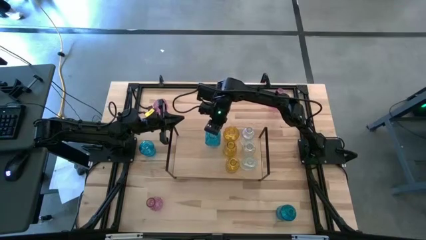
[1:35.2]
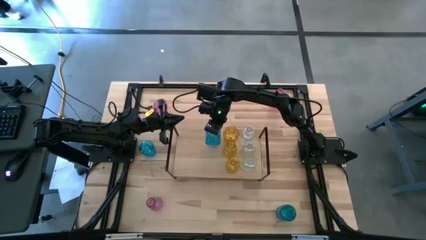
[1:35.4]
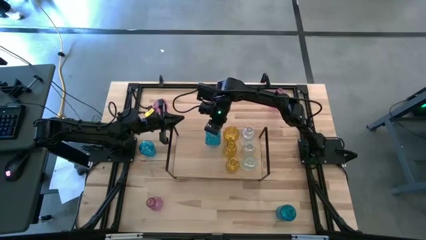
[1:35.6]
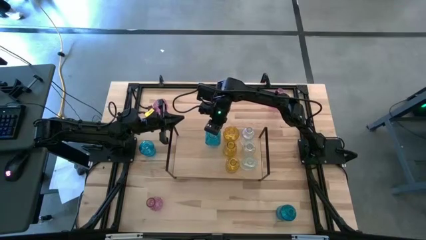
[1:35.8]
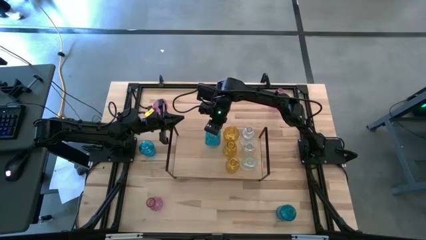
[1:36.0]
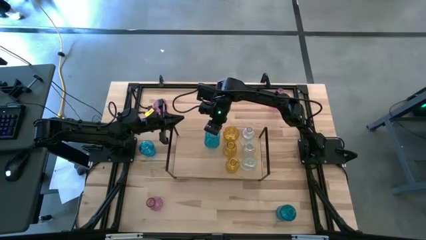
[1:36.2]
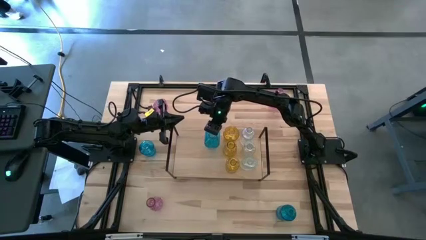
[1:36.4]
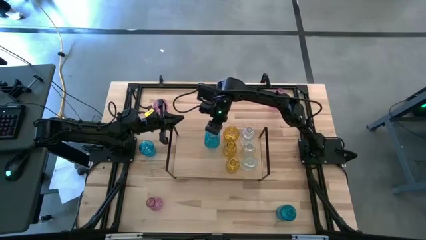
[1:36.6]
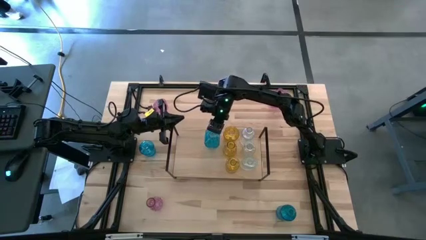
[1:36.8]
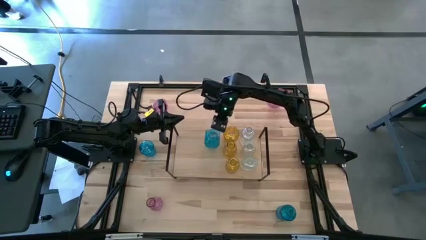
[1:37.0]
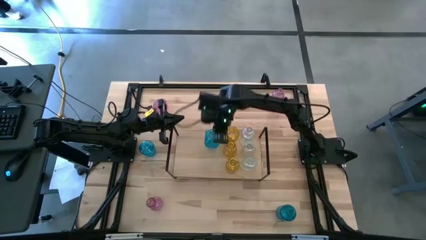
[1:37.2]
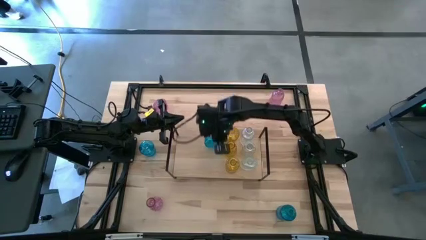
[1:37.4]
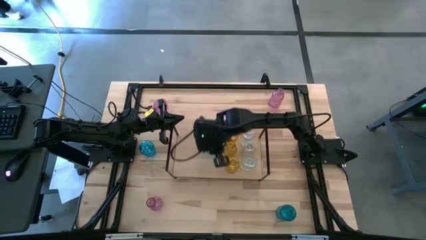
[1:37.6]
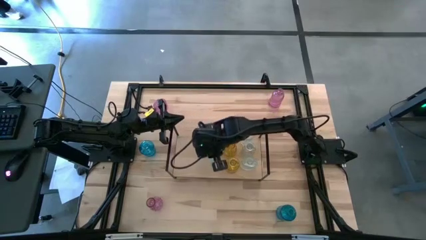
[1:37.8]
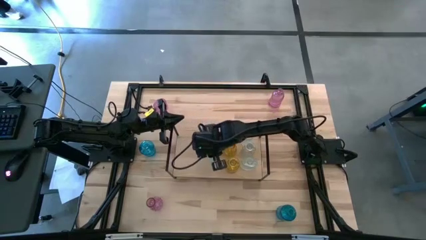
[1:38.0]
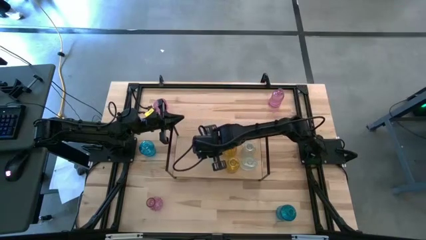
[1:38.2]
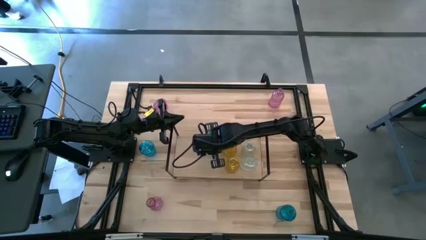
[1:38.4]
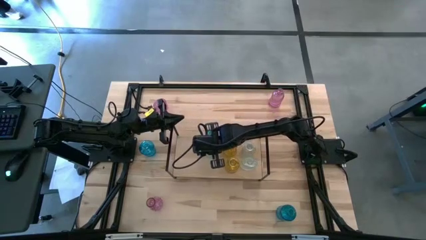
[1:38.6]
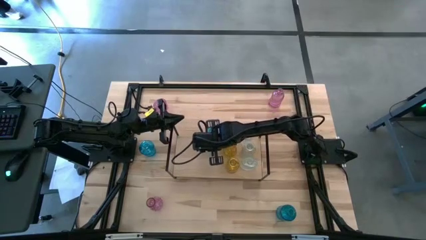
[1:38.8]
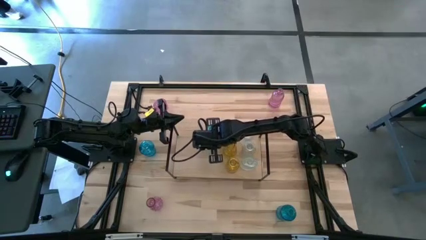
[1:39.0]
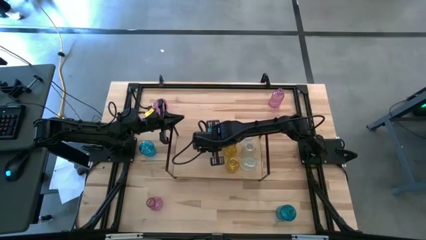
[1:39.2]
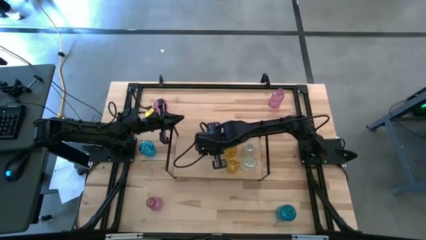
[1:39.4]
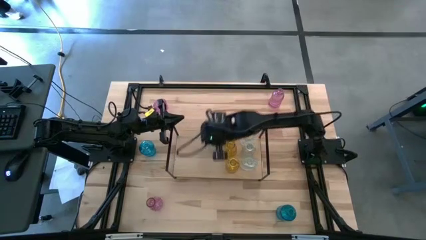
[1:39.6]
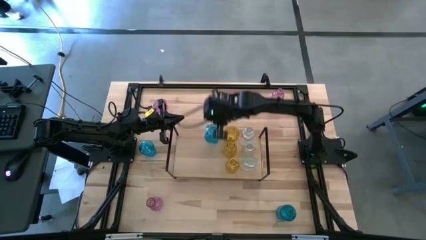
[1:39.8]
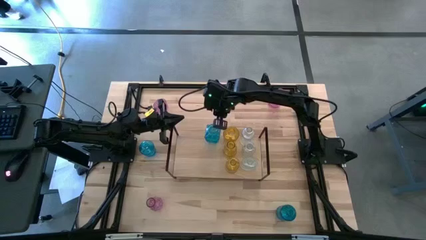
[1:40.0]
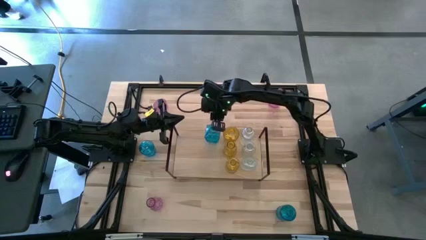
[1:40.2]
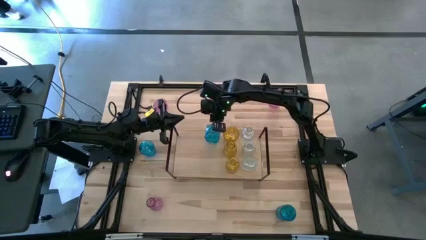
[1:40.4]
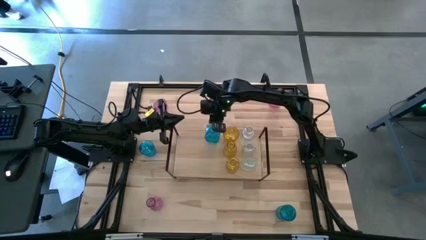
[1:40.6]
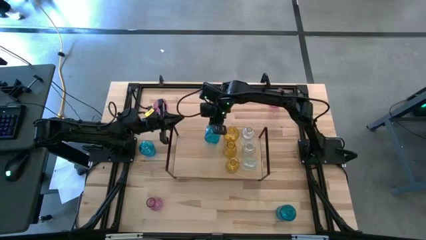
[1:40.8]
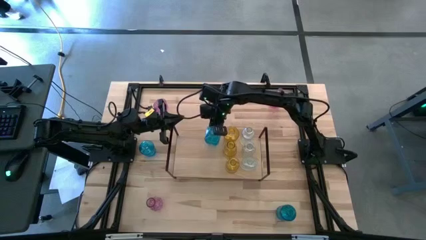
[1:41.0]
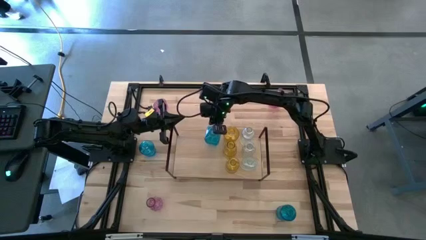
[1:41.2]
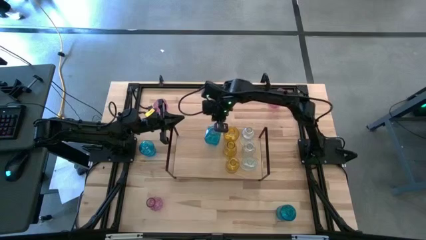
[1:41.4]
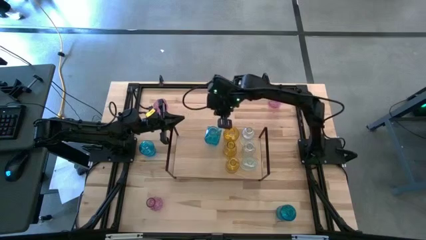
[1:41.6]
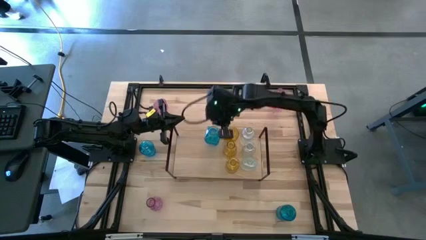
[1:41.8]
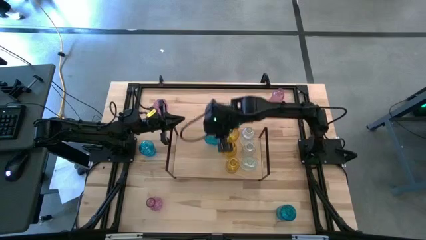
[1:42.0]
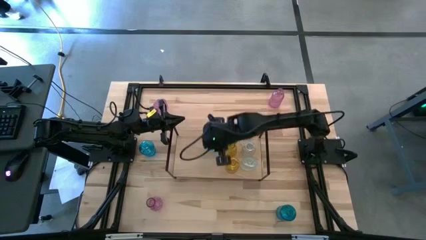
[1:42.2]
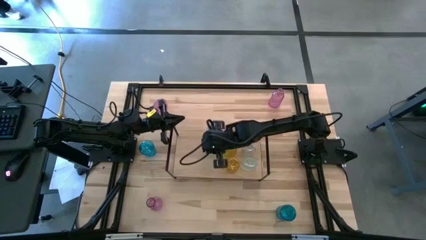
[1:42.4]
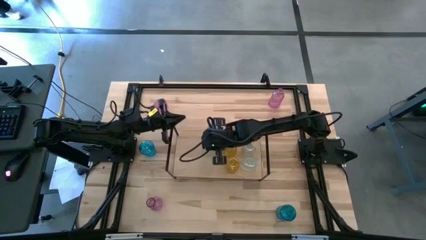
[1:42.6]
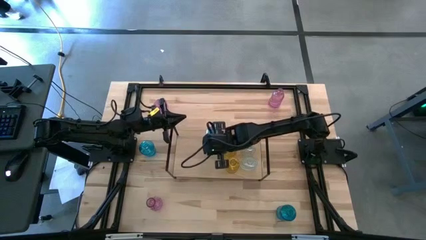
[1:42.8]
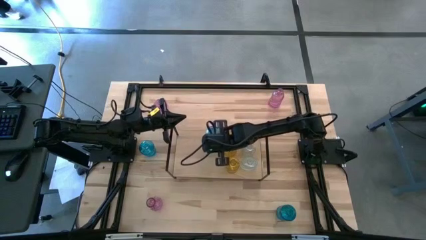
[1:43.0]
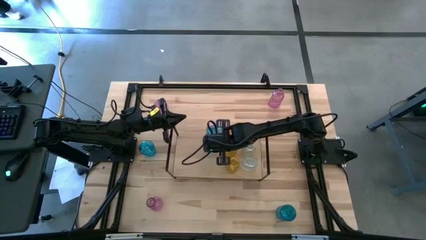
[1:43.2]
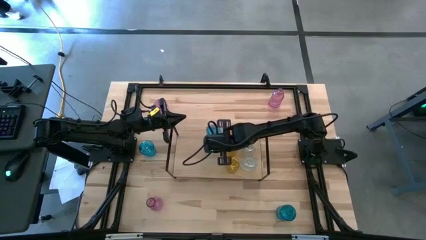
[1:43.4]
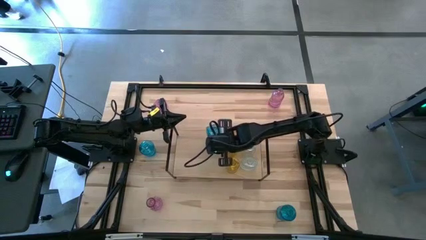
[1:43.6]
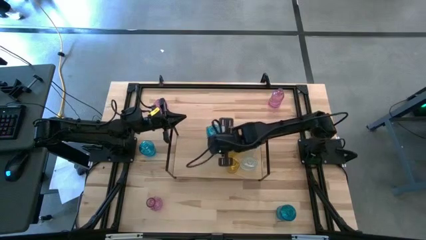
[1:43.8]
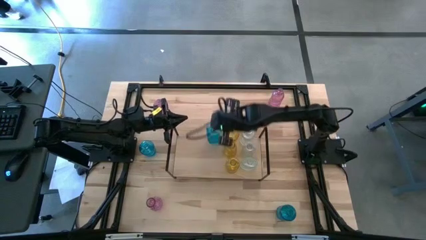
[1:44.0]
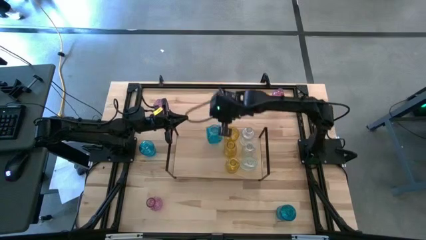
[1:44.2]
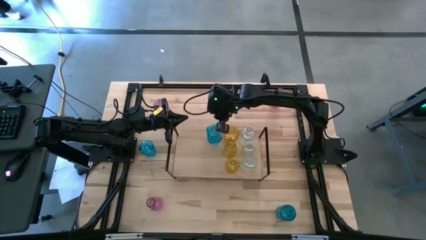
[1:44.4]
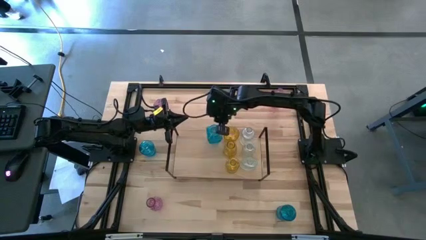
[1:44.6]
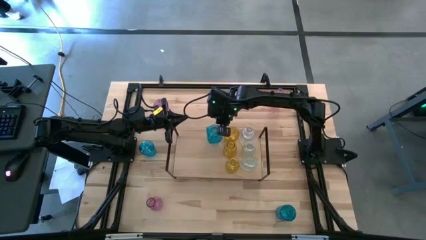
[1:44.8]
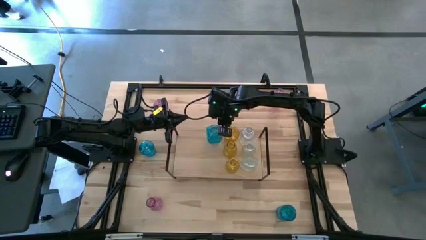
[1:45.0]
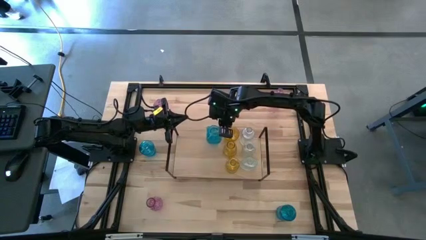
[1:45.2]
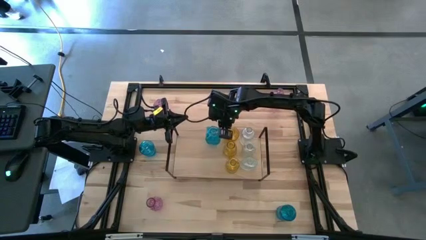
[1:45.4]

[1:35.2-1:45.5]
Task: sort vases onto shelf
Put the top blue vase on the shelf

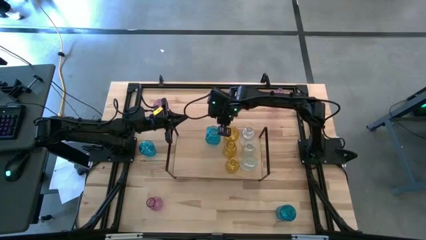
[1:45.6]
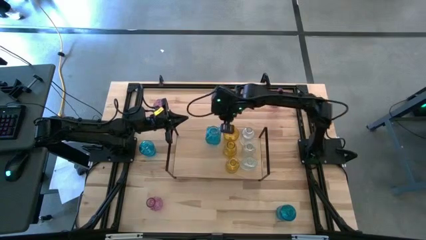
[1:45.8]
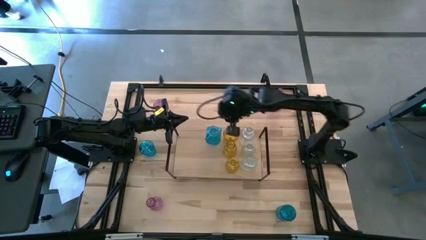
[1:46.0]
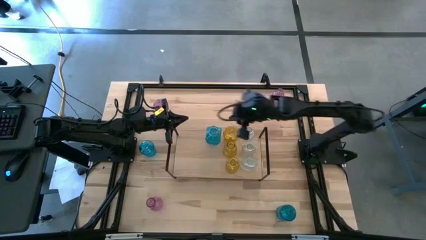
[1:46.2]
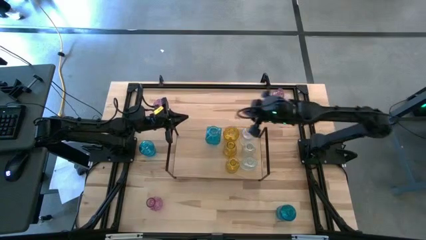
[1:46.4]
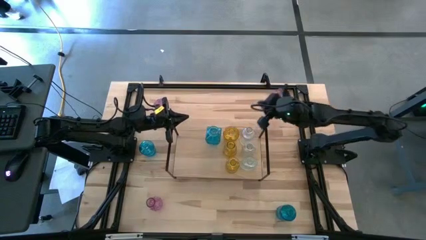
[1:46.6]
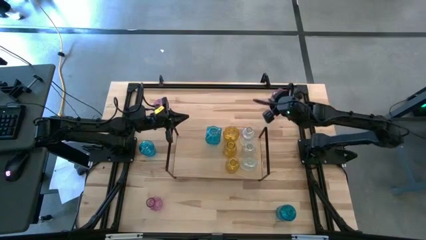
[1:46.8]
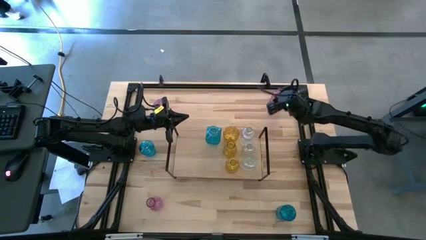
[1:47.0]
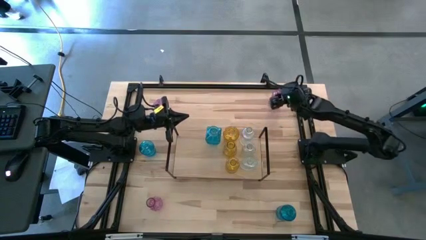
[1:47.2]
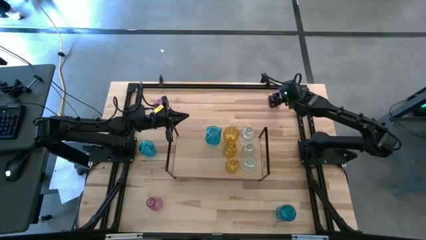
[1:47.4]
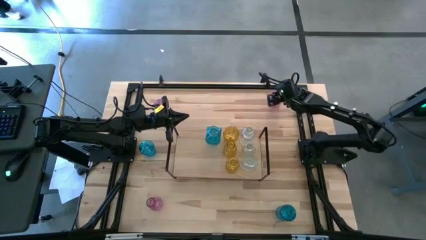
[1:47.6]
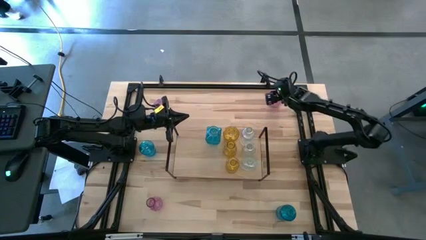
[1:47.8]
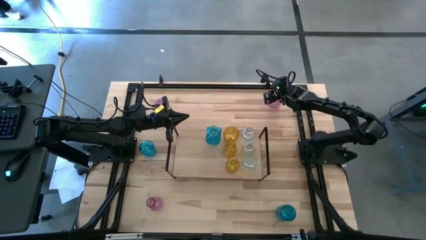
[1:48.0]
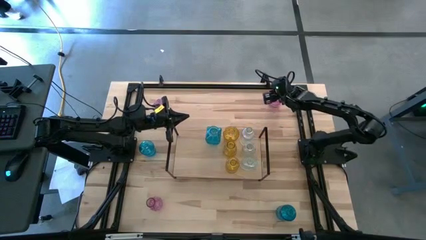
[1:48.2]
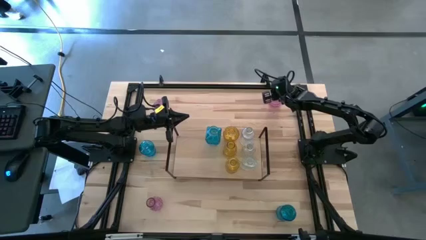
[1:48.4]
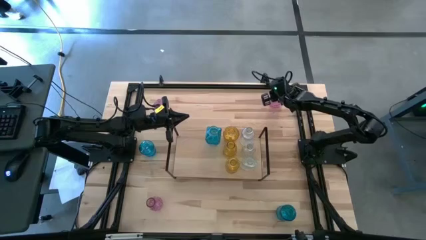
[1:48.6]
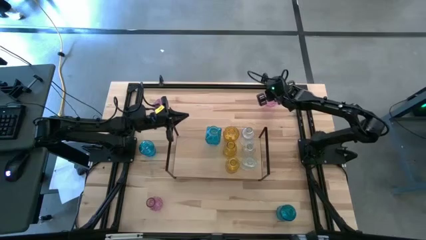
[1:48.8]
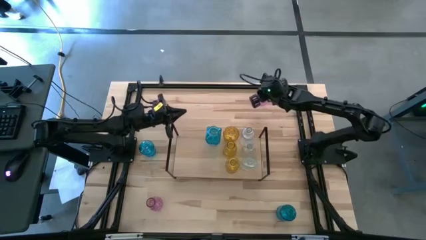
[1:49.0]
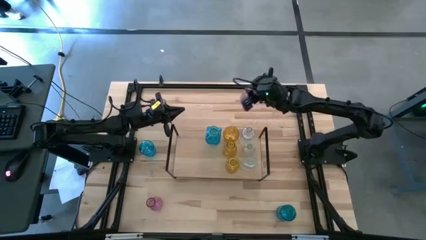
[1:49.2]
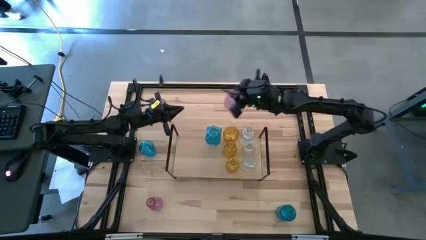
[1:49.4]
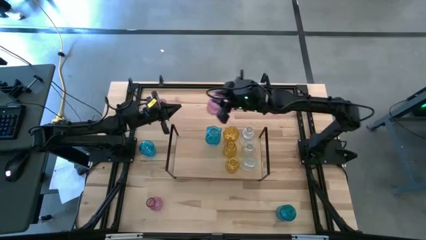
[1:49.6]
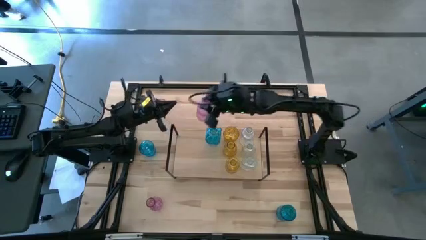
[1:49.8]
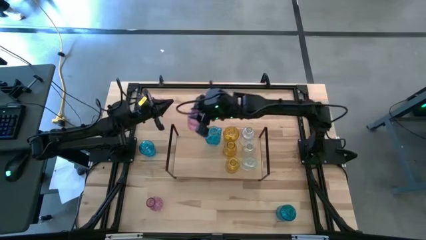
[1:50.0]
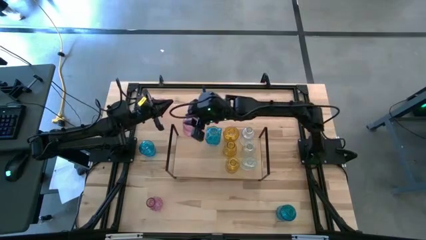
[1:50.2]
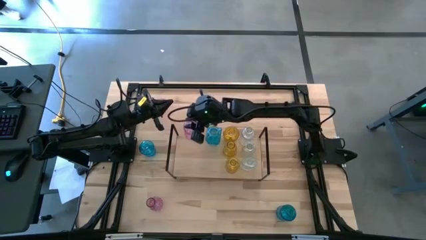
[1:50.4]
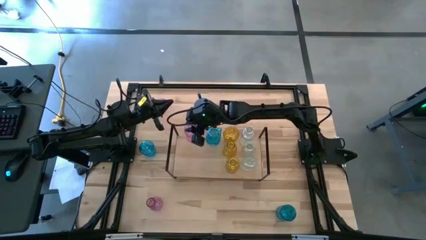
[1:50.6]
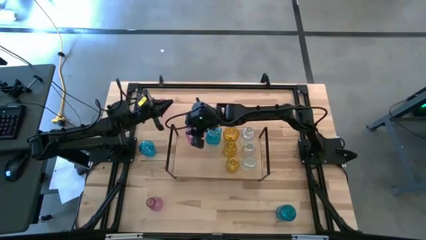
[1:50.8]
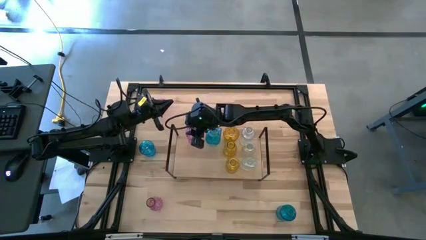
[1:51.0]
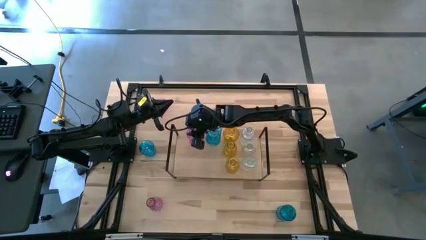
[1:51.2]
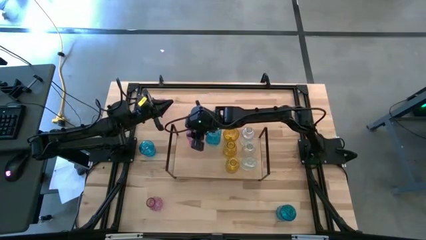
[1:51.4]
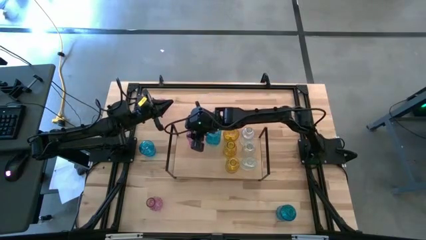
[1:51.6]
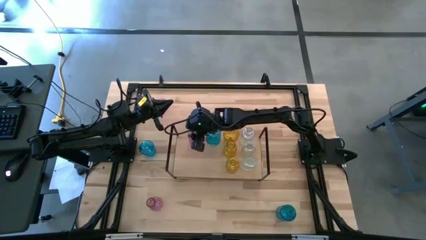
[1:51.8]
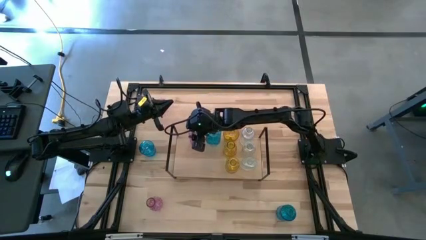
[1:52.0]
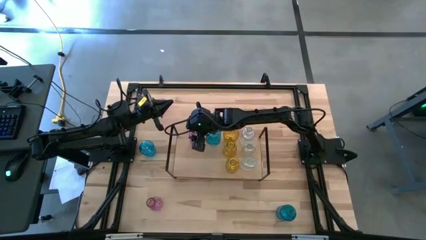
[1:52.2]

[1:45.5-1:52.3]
Put the top right purple vase on the shelf
